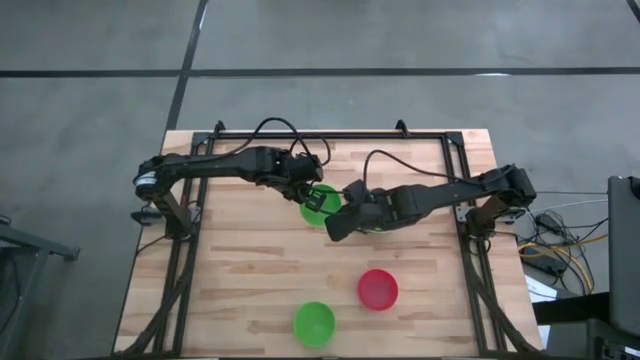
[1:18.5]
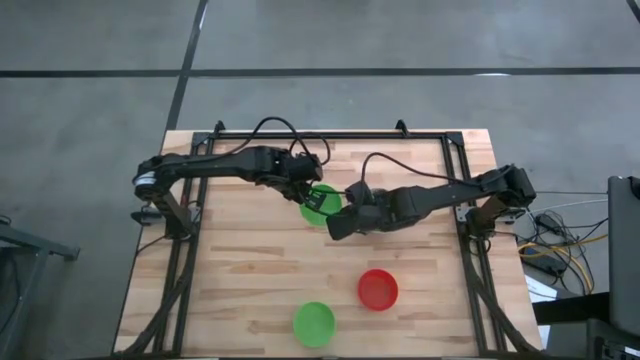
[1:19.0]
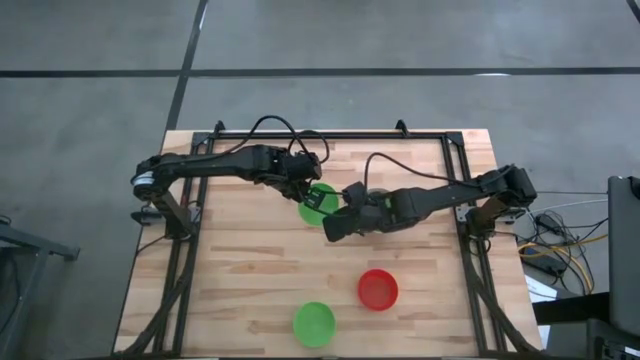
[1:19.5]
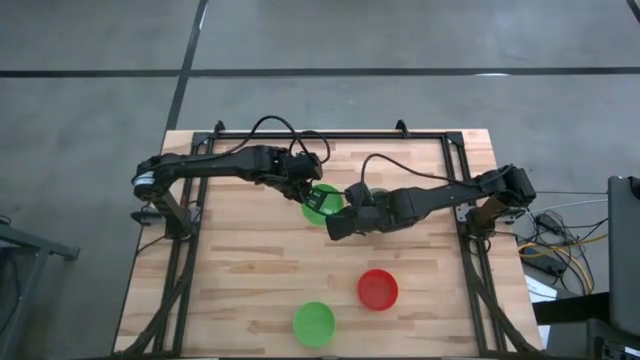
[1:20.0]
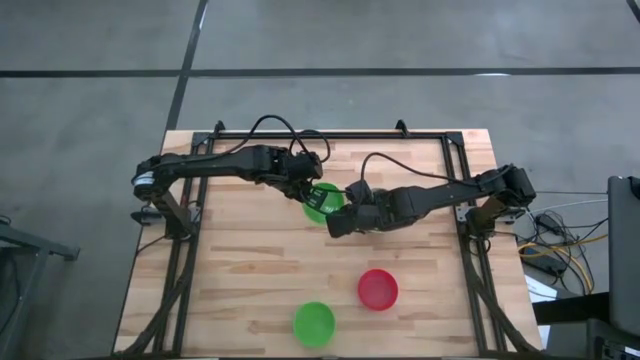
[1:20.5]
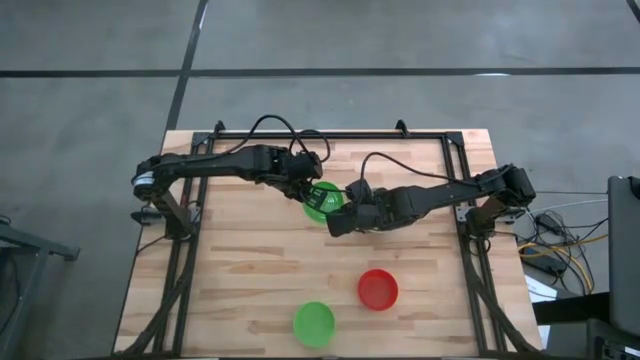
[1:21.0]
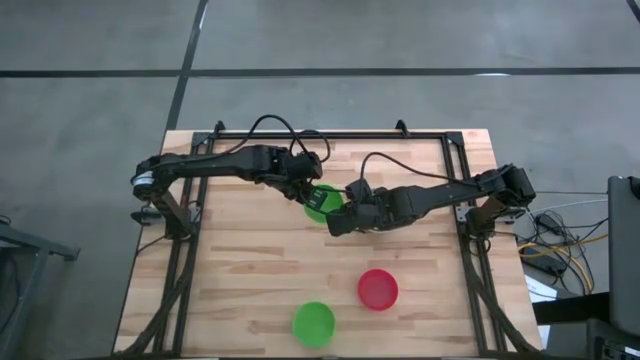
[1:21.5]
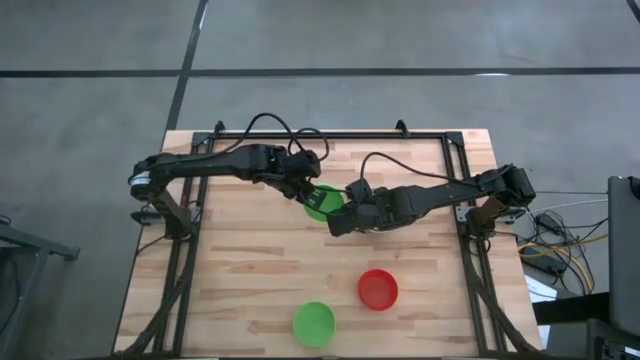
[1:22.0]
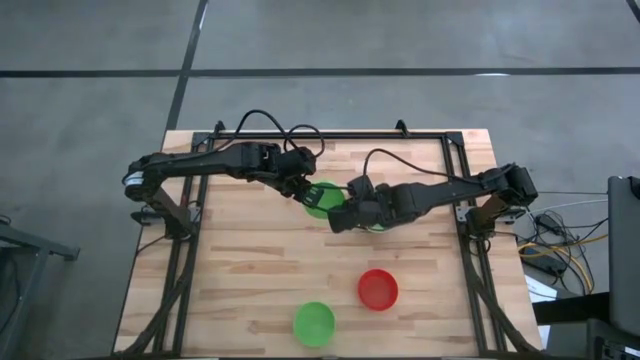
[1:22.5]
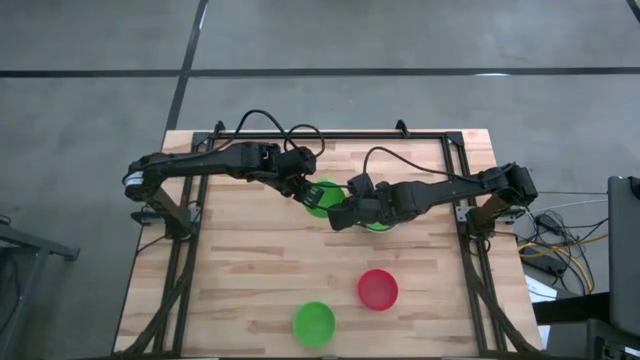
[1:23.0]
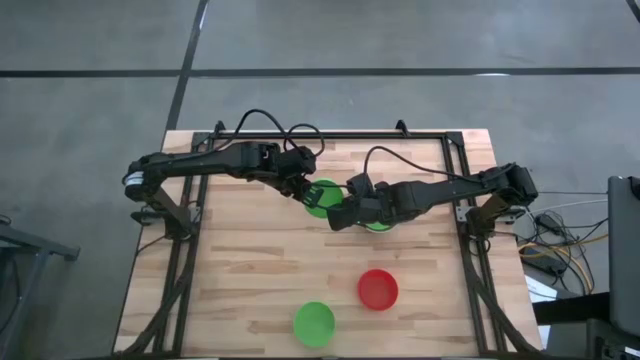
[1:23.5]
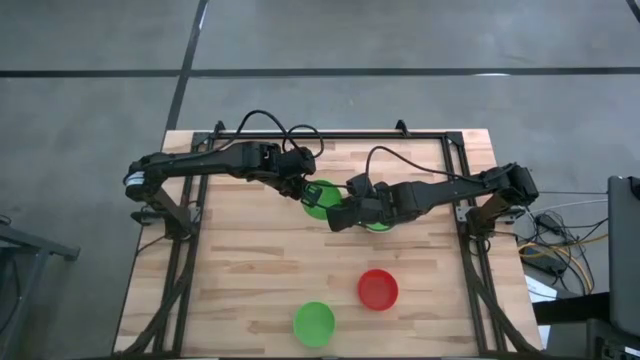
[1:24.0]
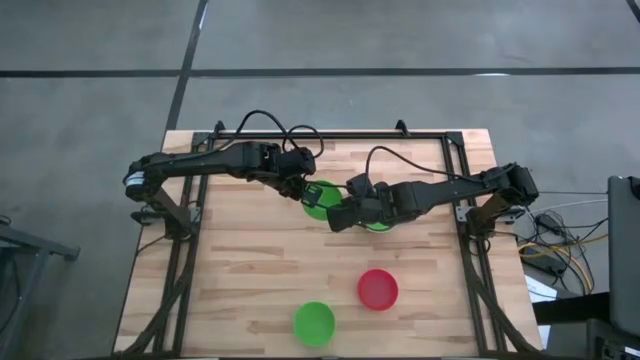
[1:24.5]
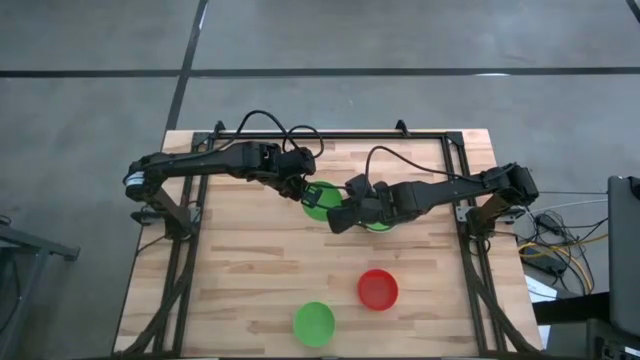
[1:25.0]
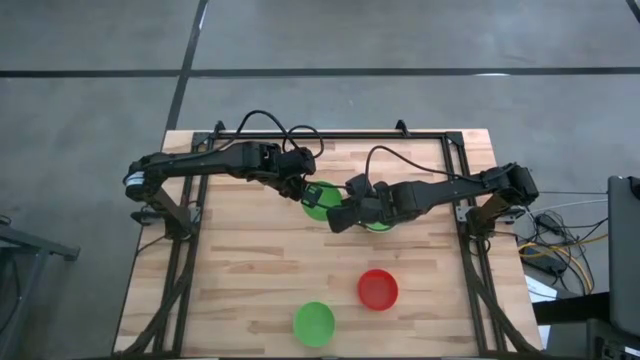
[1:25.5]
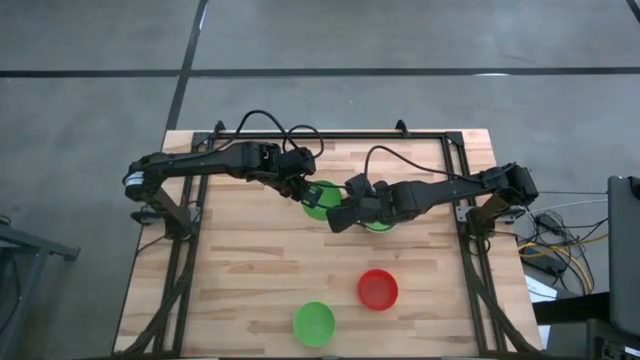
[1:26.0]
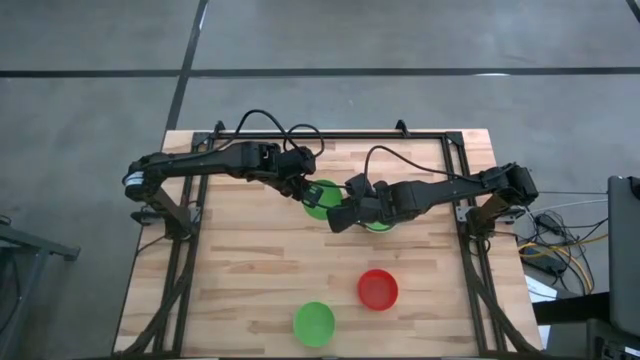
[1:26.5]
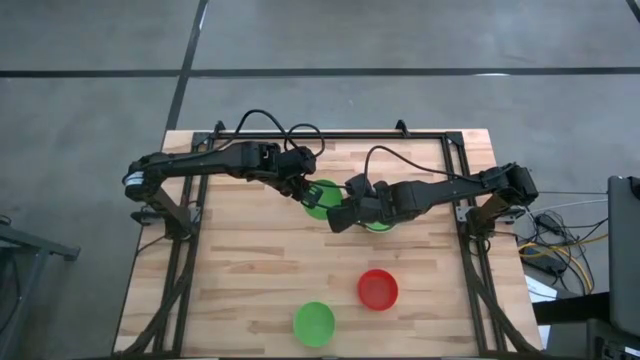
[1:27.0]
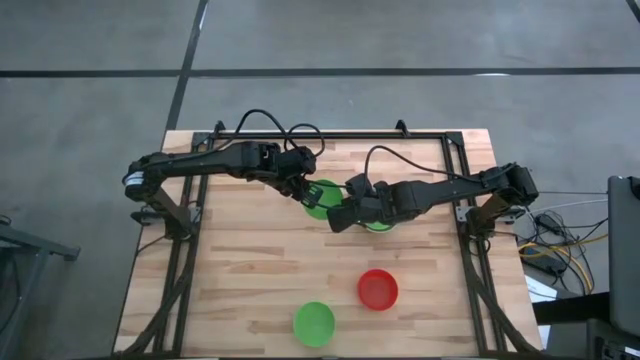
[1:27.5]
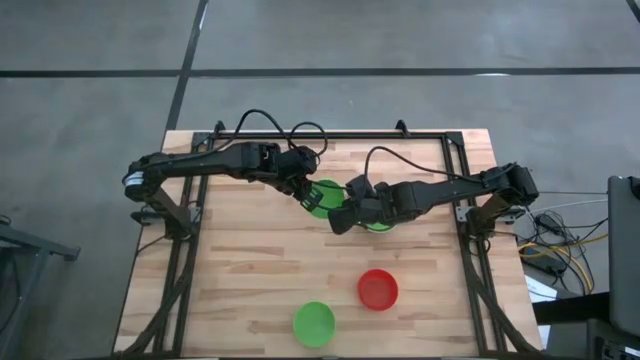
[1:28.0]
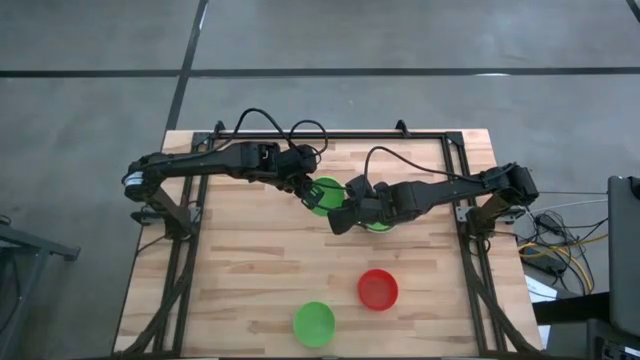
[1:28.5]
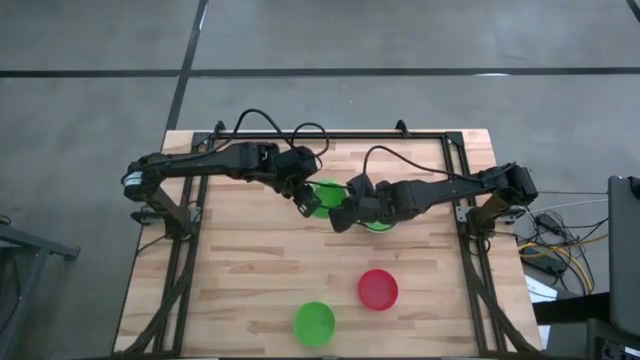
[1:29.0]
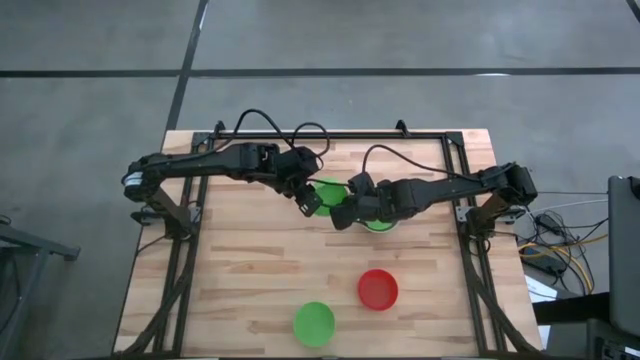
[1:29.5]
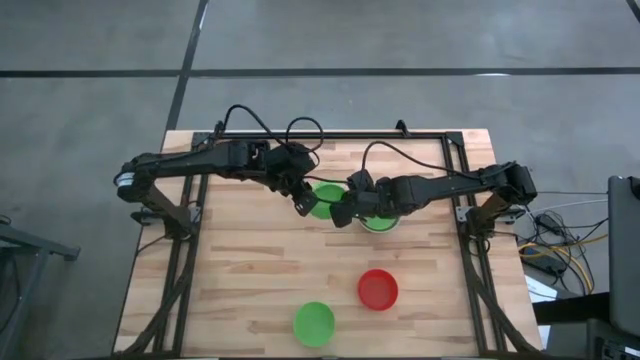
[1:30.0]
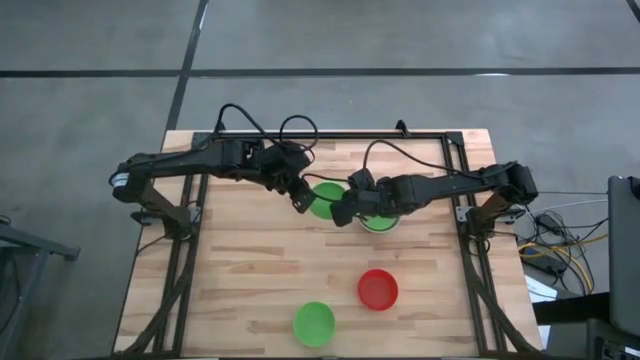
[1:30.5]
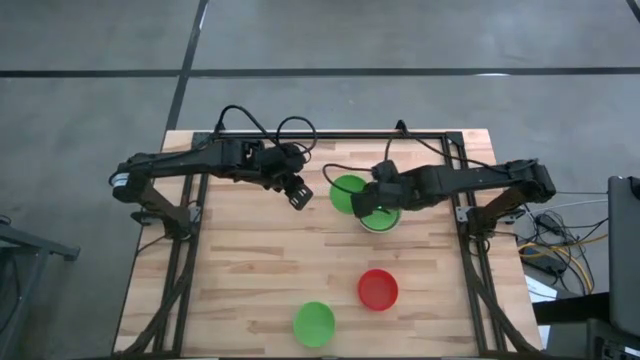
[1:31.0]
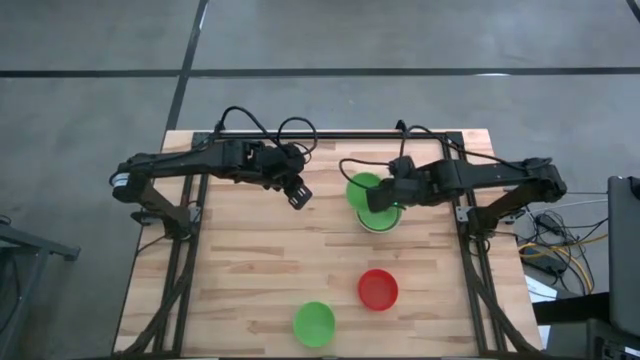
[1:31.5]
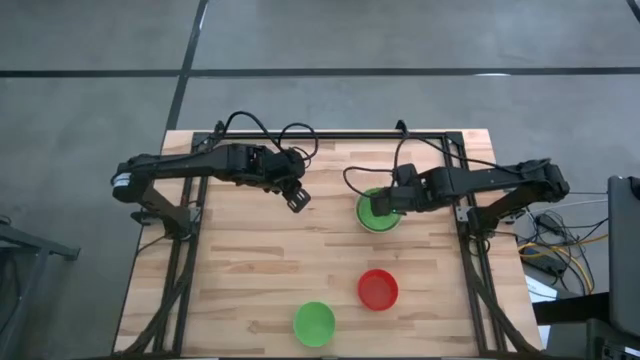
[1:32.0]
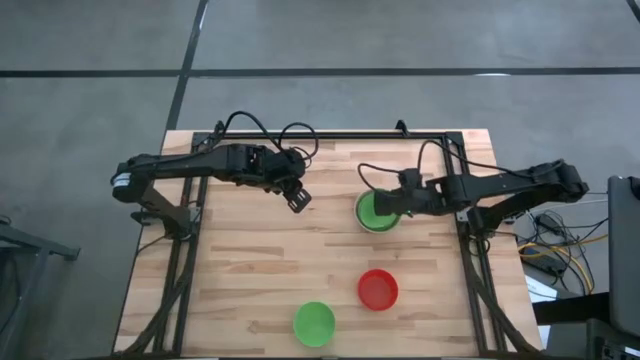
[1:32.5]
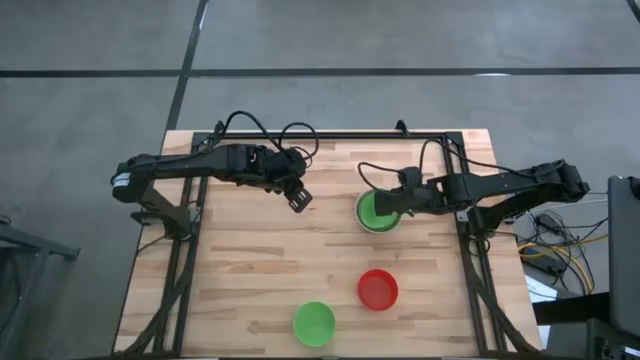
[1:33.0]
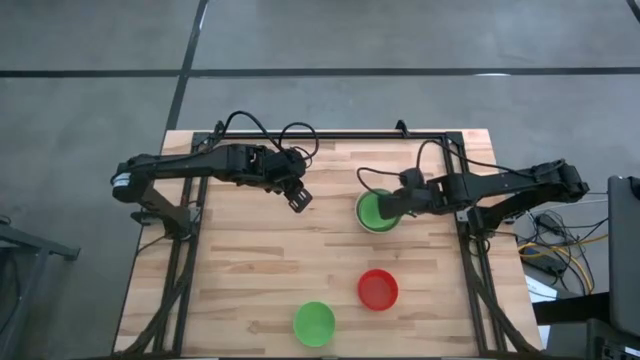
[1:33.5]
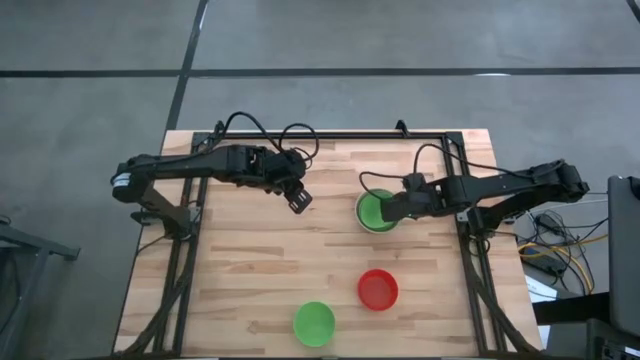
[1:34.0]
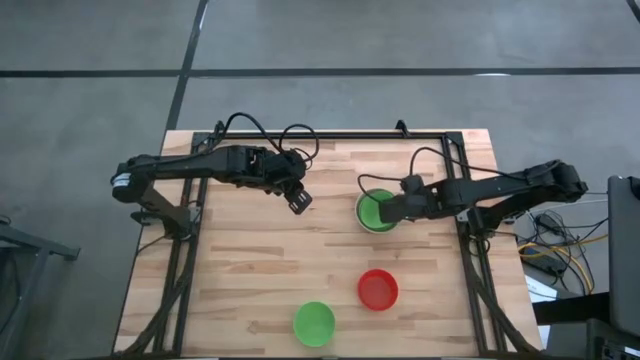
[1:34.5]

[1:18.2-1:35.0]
Stack the left green bowl on the green bowl
